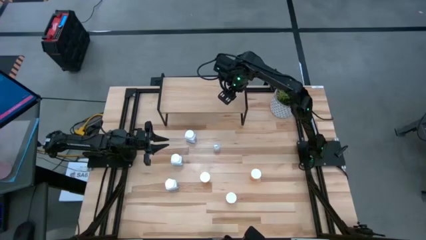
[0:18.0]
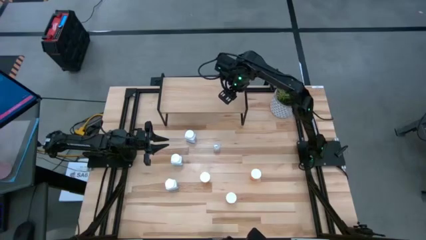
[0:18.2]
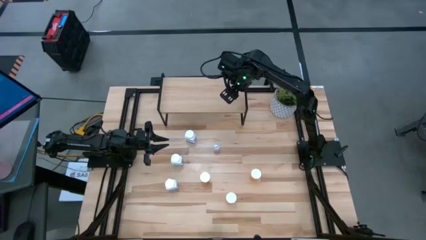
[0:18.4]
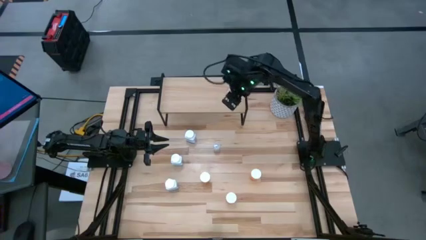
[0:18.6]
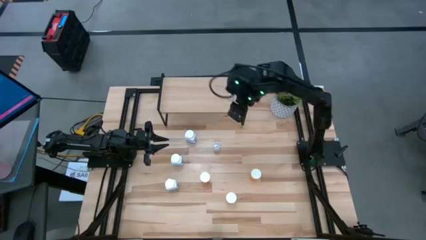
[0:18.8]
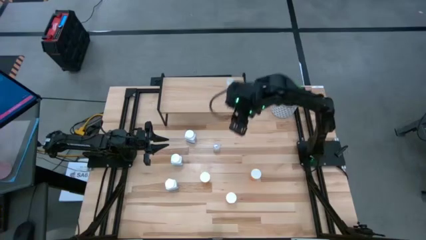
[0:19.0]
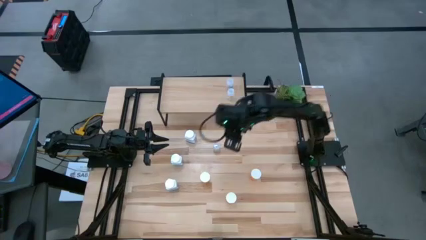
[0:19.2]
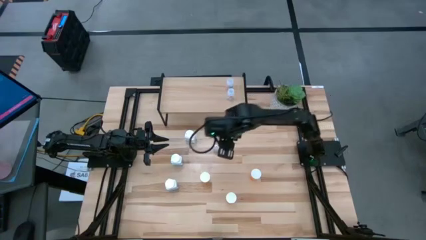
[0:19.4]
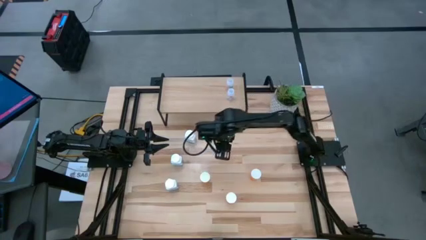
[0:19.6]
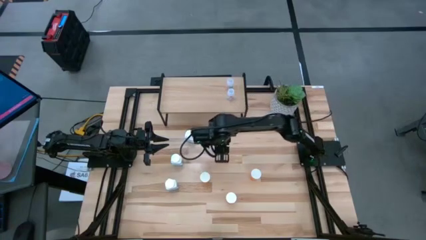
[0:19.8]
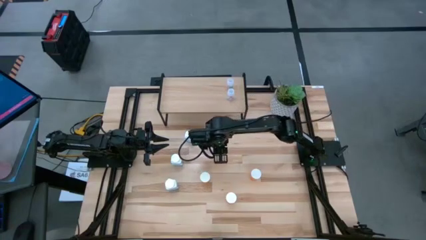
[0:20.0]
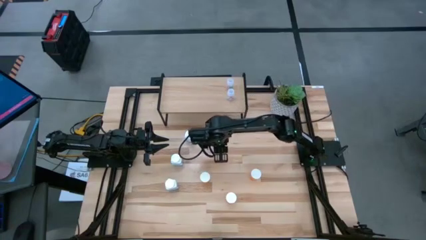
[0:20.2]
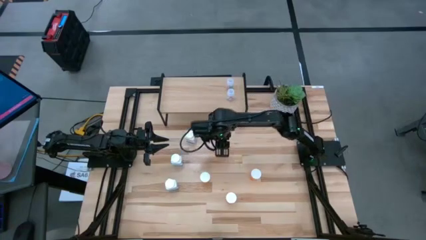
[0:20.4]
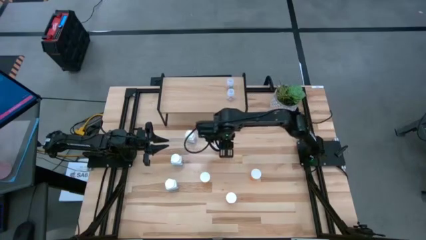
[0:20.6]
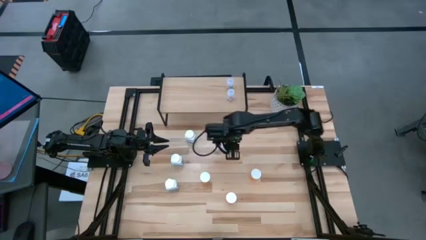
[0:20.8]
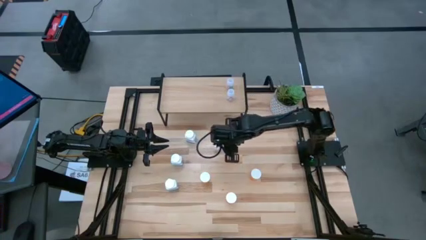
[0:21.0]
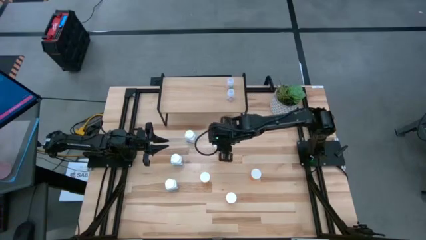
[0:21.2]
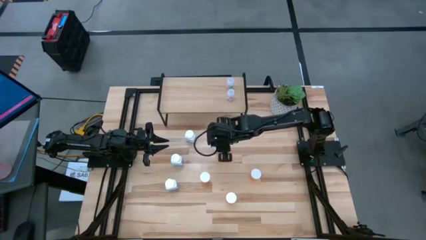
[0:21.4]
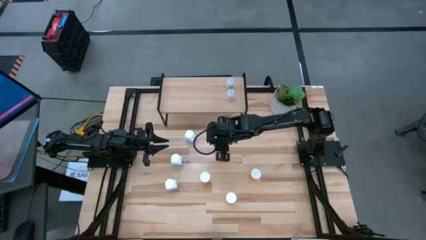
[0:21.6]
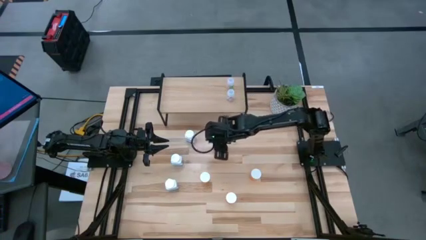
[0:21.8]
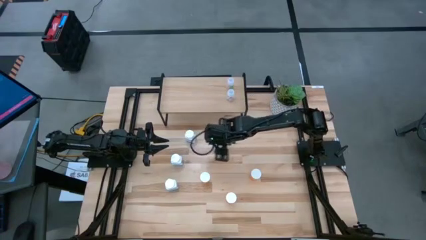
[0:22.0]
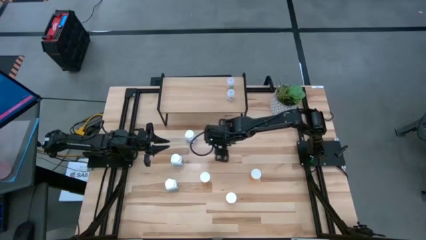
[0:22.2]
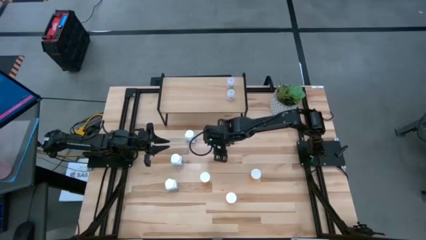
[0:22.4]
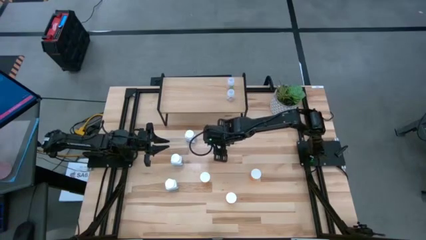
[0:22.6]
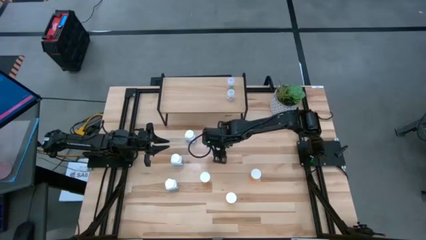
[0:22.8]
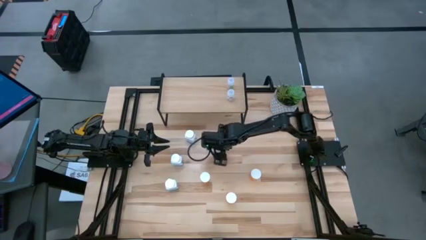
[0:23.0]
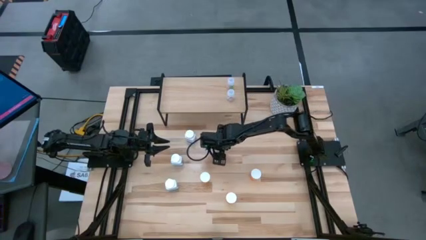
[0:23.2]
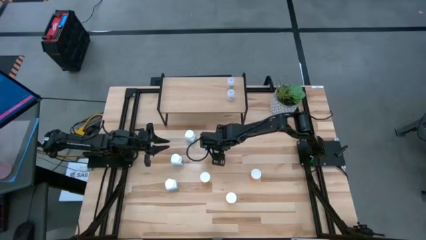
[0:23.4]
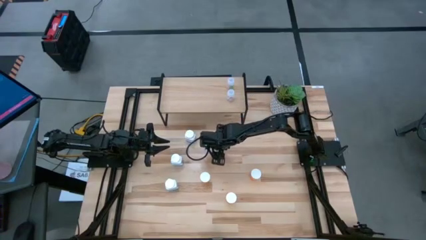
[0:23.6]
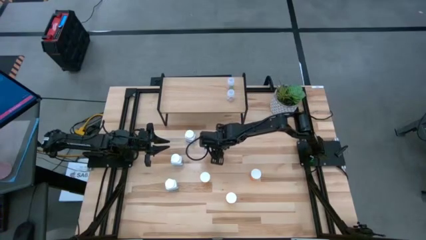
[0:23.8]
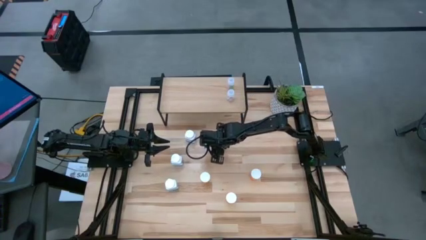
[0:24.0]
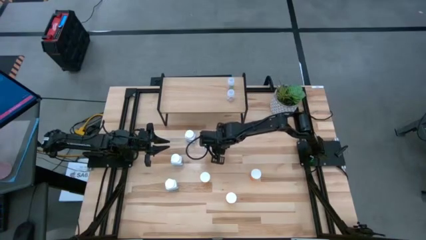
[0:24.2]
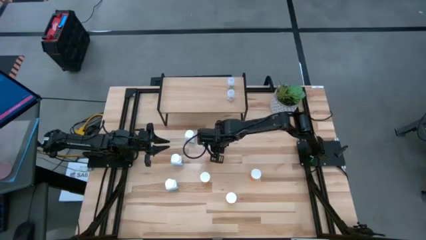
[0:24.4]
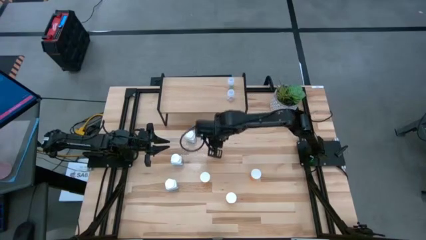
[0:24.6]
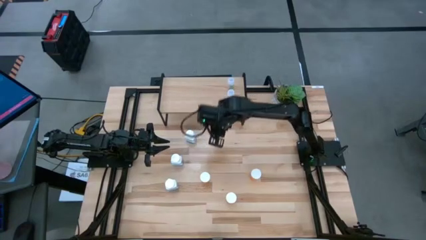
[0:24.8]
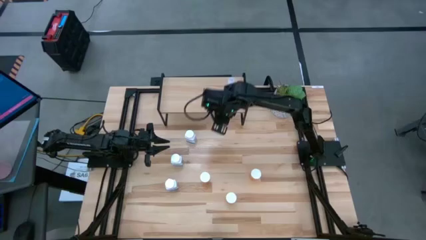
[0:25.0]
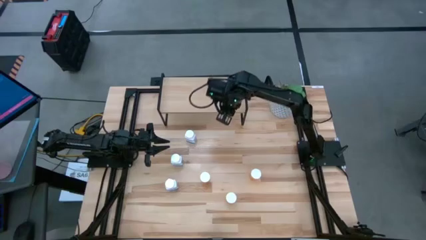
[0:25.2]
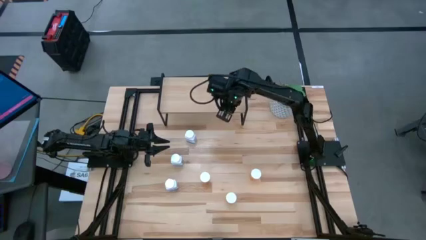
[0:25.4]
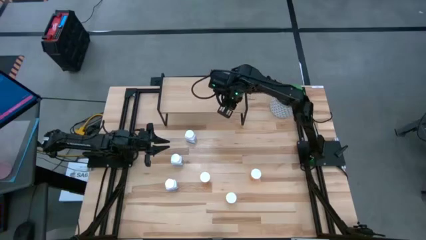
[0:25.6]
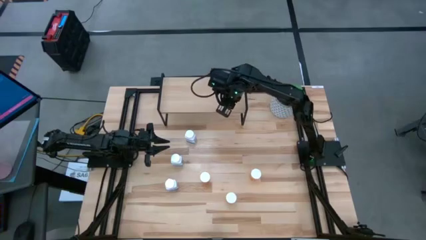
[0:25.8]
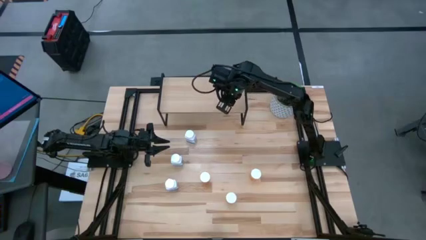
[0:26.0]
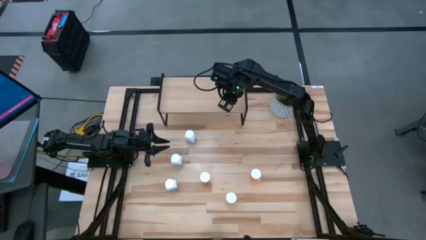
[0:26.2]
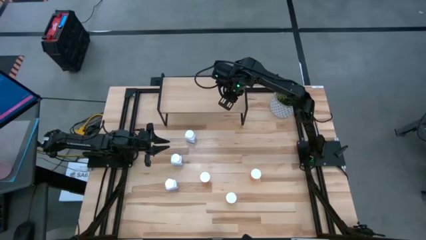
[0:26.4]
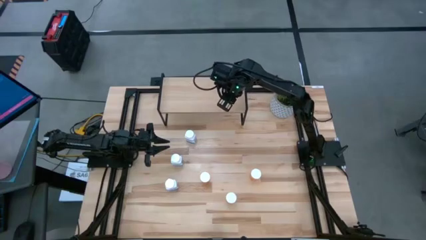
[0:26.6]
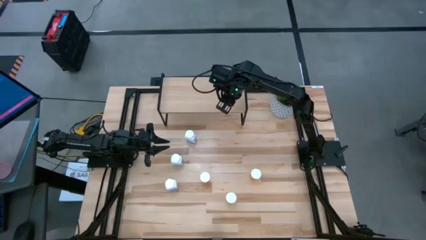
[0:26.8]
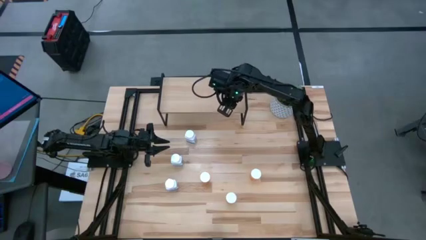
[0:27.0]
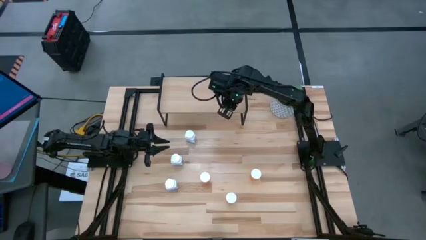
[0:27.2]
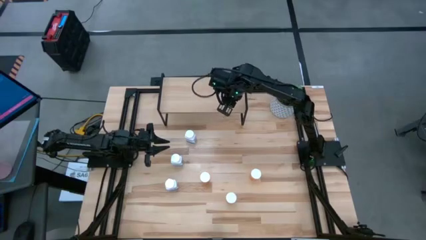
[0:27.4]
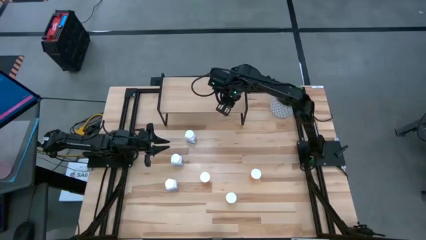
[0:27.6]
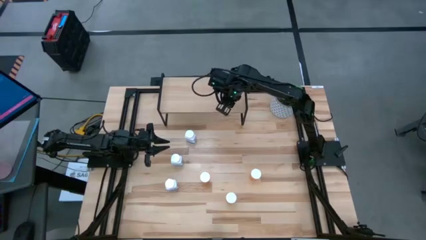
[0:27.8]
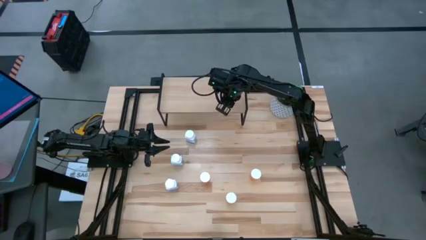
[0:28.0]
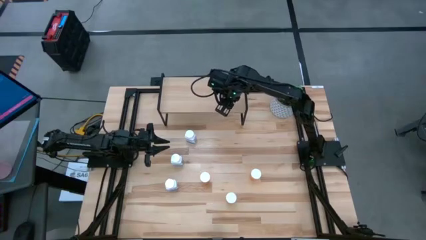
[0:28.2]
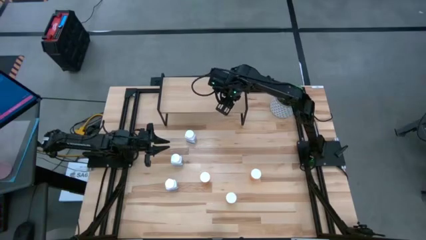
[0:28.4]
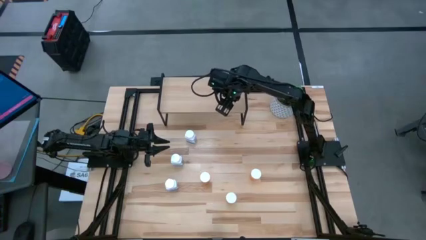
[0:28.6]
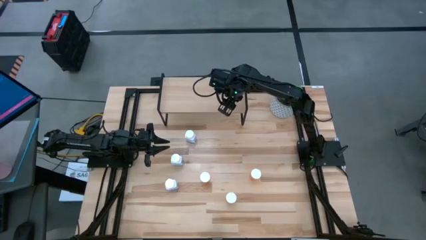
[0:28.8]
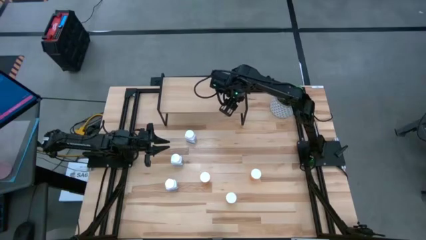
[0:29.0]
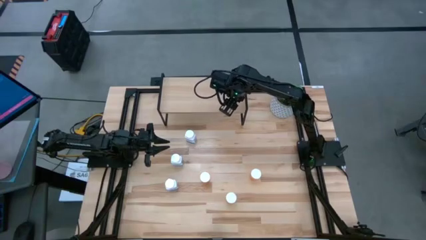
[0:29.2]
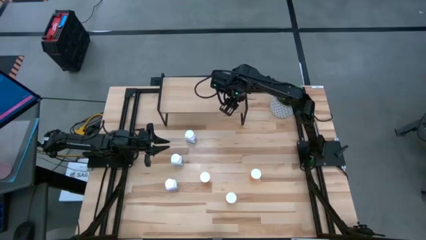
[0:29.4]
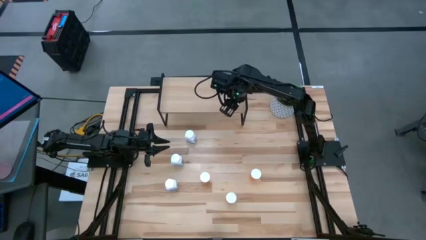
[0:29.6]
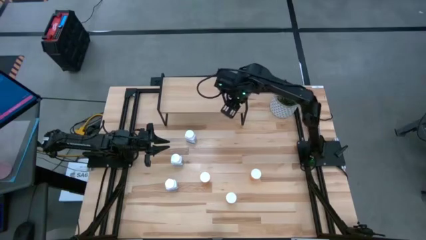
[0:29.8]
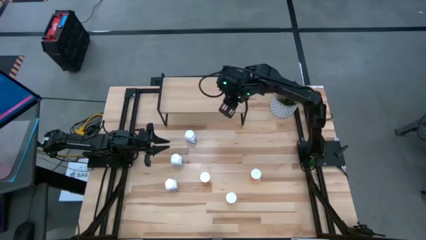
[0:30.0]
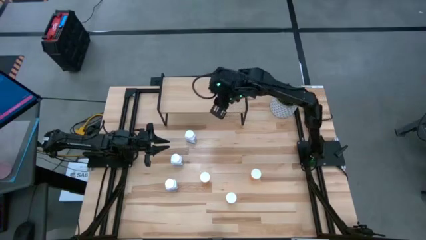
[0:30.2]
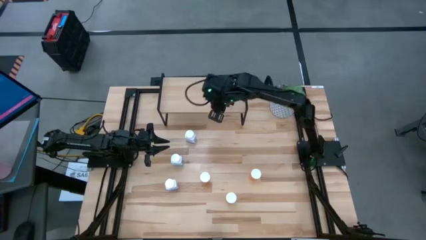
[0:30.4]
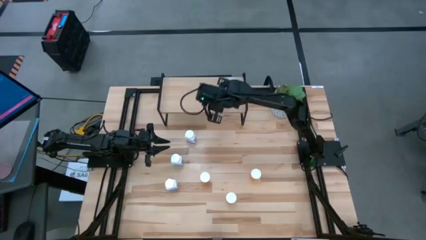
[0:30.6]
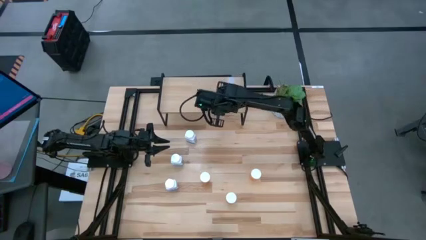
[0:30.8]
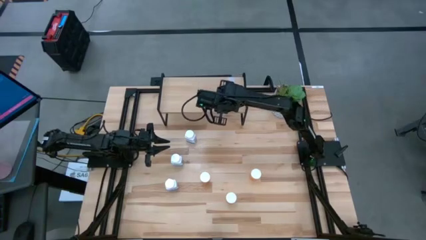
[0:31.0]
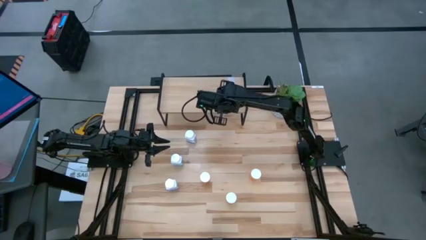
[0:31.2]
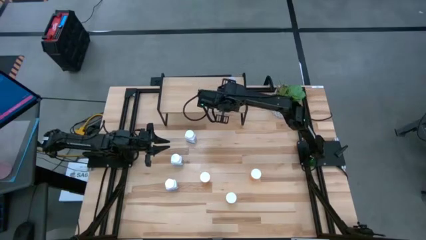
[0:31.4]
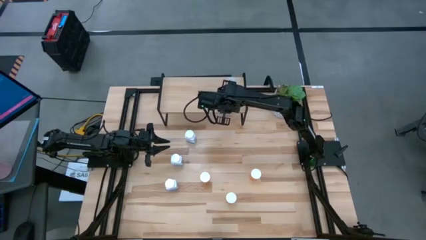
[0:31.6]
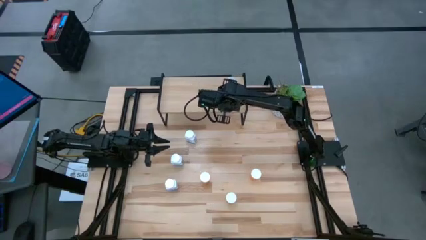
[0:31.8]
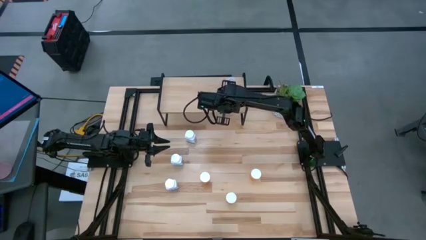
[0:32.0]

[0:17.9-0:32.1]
Task: Pick and place medicine bottles onto shelf by color
Put the transparent pill bottle aligned with the other transparent pill bottles on the shelf

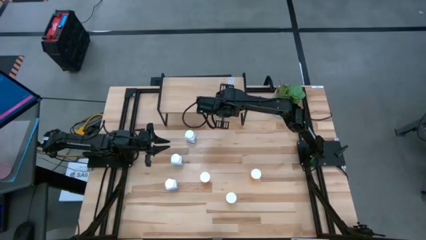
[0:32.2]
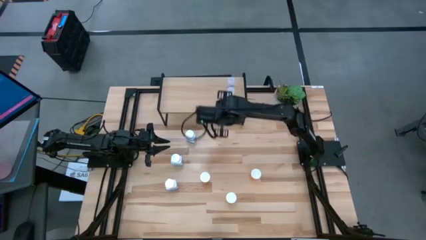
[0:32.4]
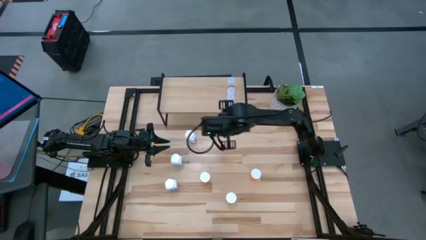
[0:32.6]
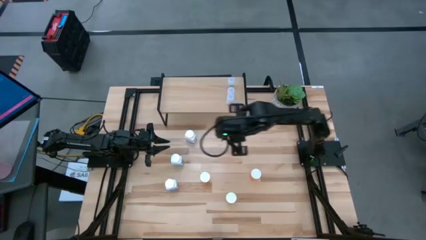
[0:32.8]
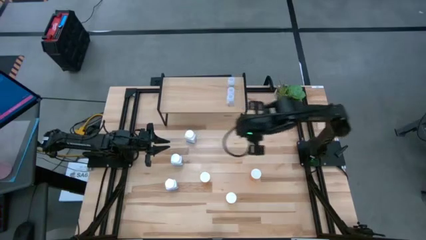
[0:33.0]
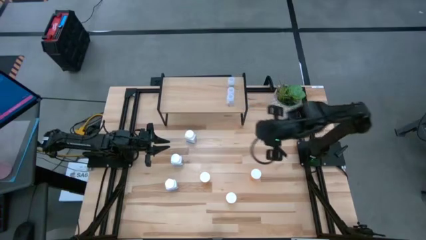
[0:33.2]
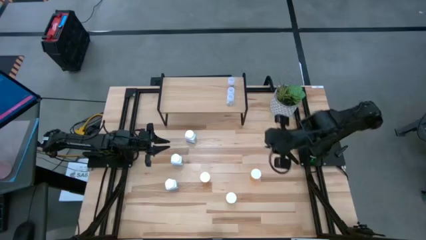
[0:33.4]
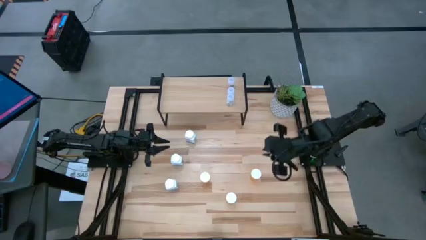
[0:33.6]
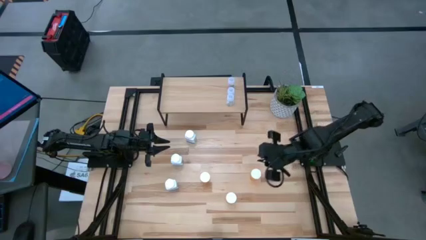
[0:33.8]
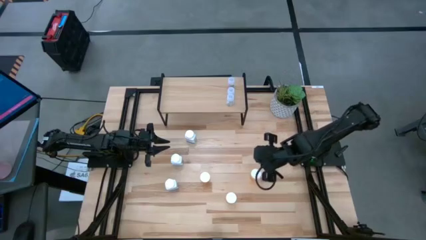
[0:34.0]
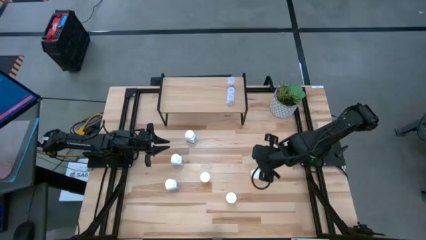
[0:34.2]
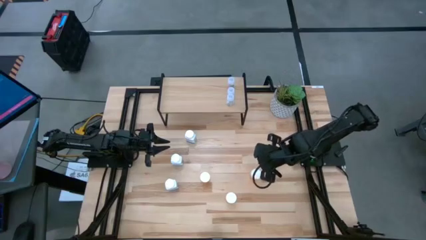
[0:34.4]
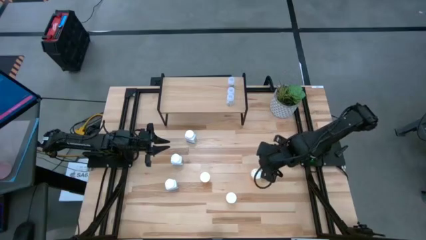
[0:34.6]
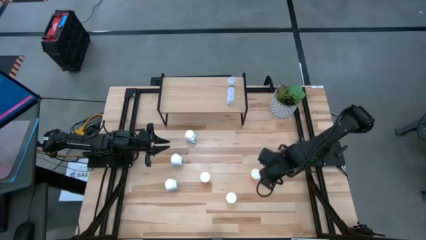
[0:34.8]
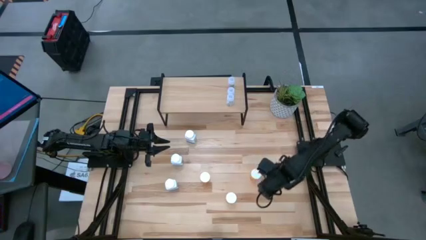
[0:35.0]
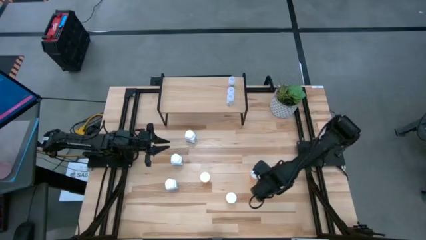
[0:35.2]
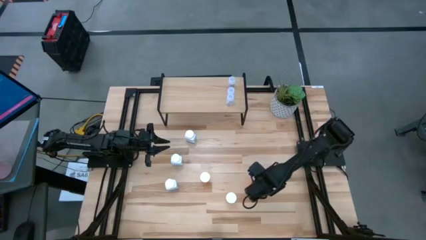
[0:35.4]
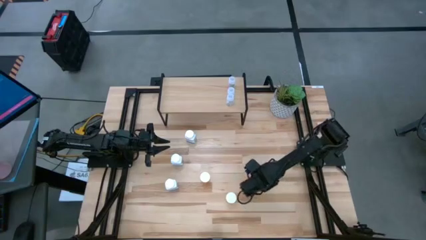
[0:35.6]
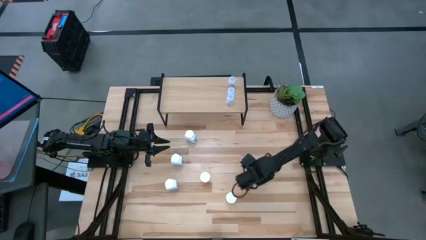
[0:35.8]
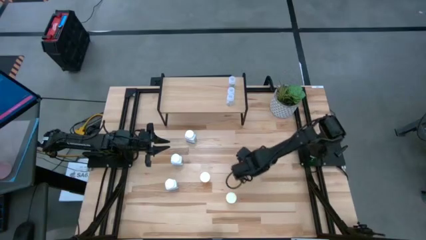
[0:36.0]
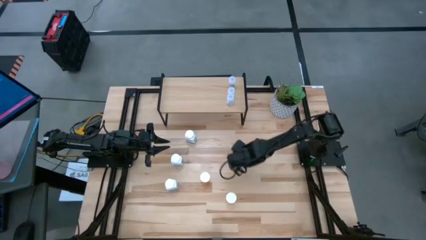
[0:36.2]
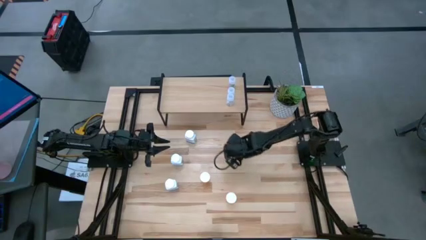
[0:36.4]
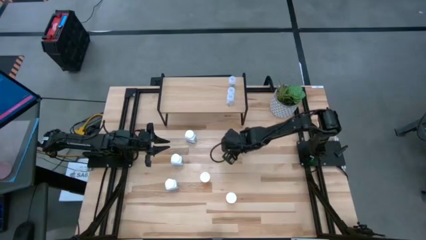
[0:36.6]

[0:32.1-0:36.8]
Adjust the right orange pill bottle
